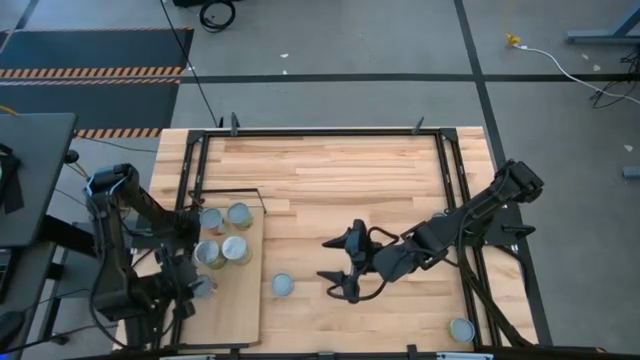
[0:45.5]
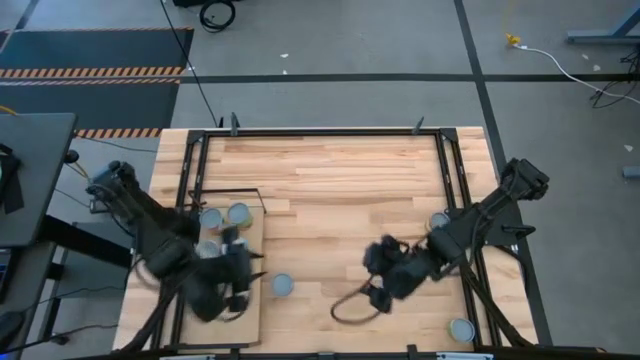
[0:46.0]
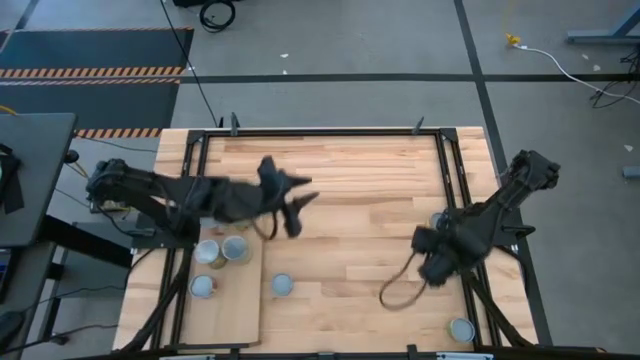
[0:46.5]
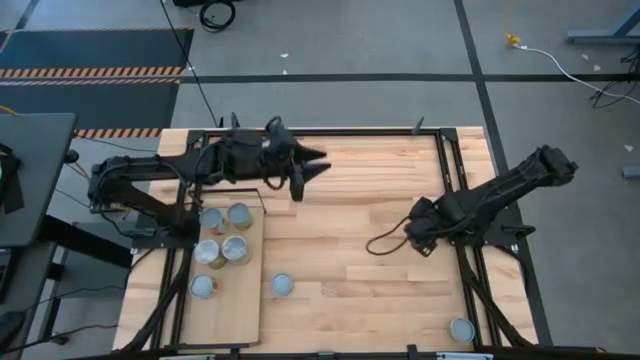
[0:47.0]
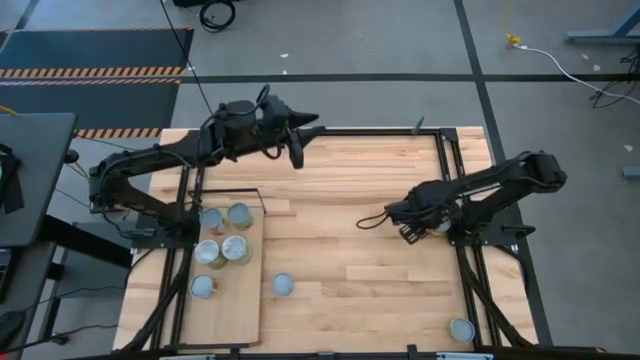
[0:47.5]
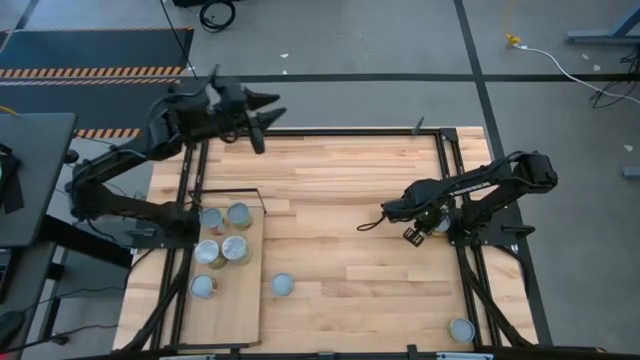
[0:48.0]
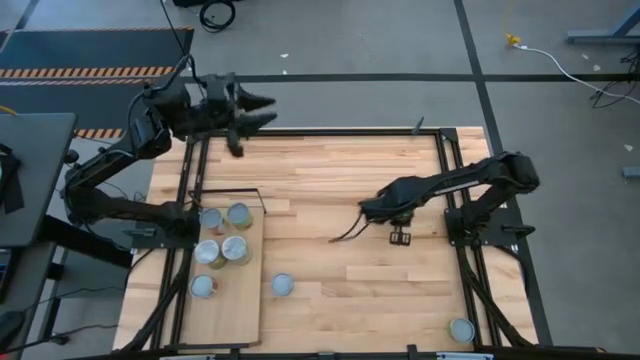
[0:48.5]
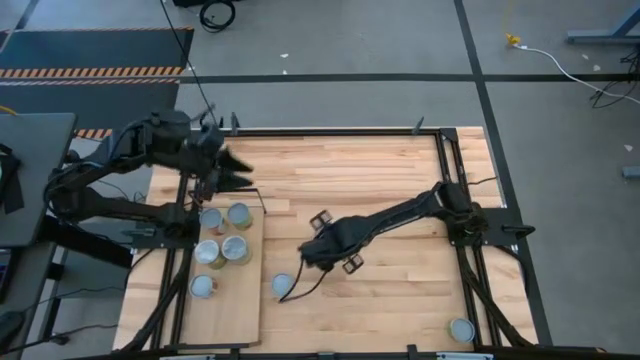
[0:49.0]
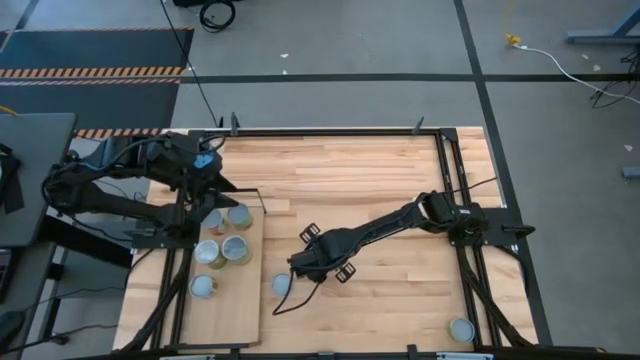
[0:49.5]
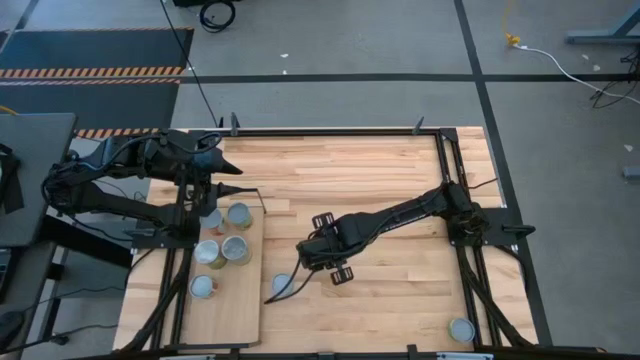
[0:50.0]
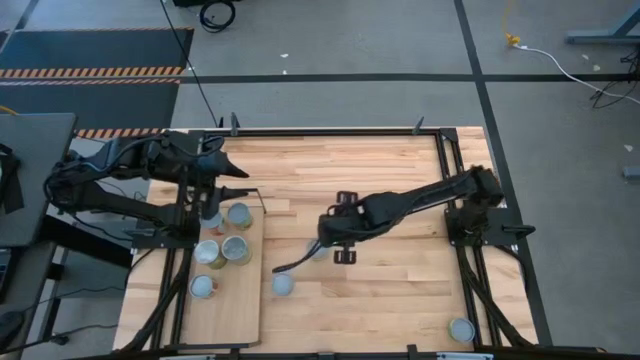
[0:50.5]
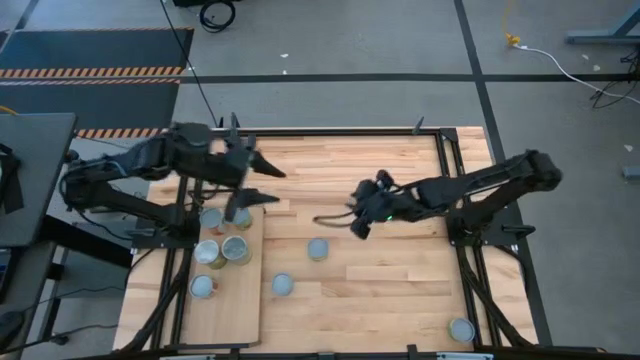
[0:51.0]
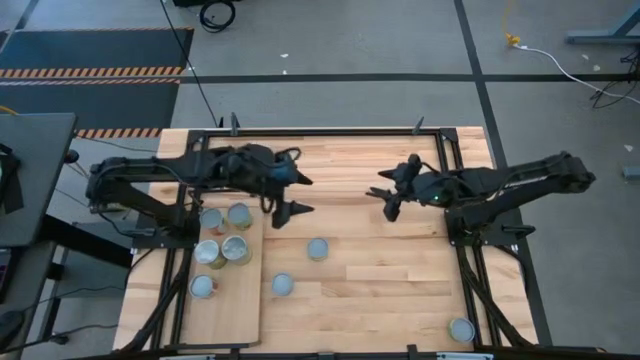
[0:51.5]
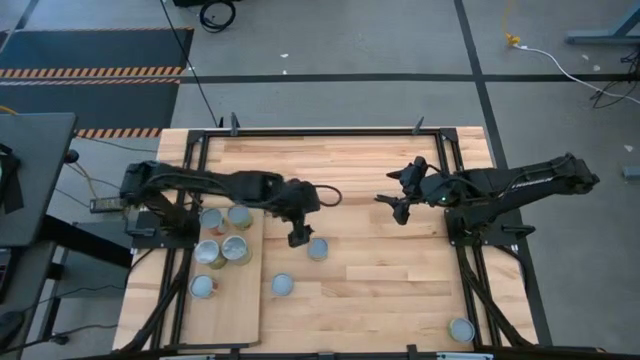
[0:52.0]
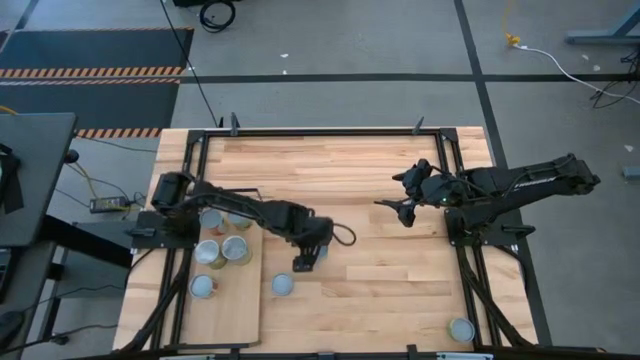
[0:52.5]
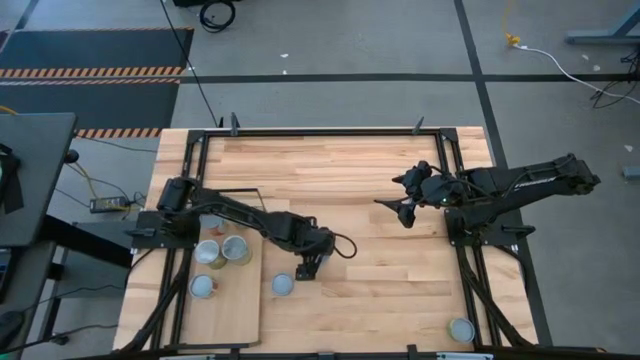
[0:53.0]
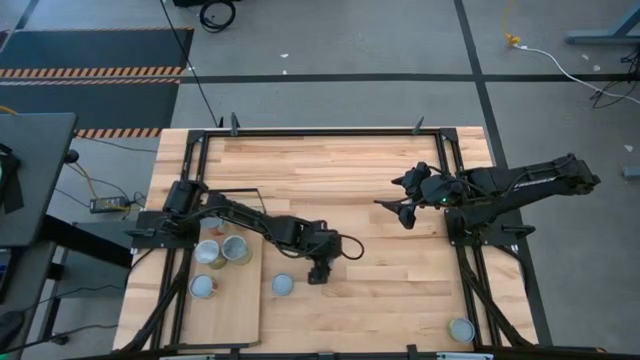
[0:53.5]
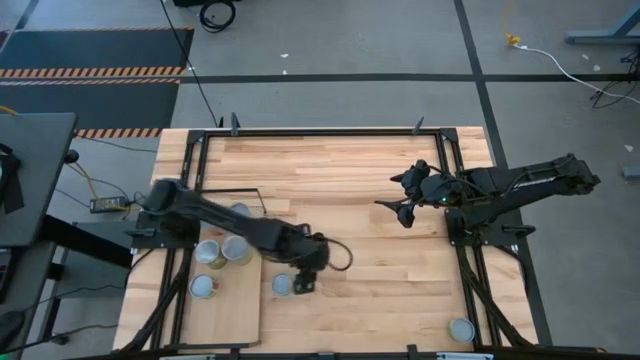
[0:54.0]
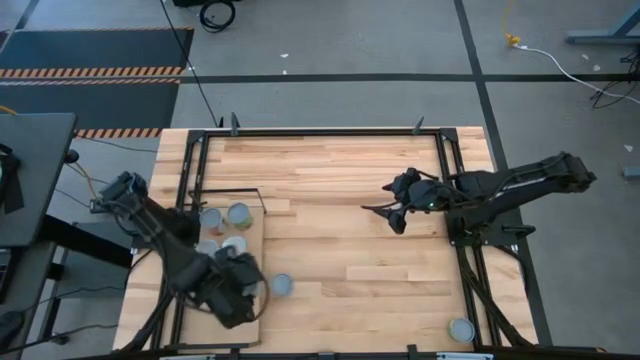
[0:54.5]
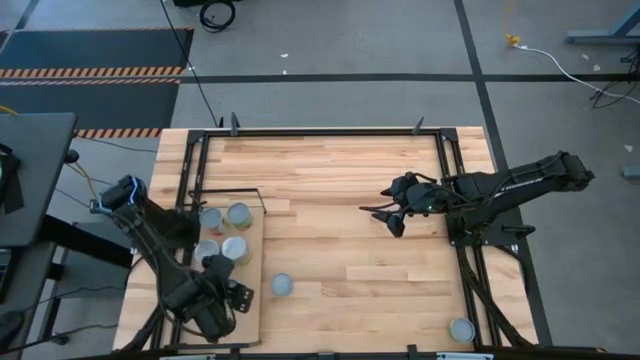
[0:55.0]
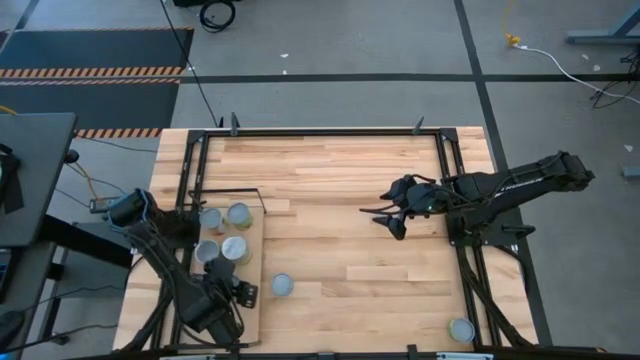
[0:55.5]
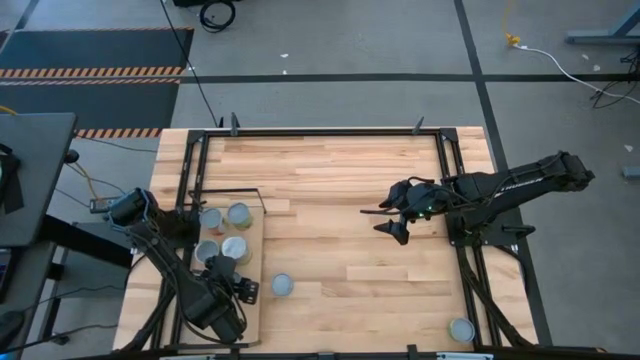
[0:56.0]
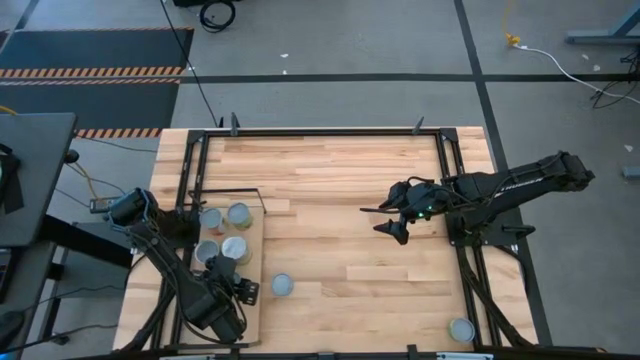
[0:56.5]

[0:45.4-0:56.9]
Task: Pick and place cans onto a shelf
Put the dark green can on the shelf

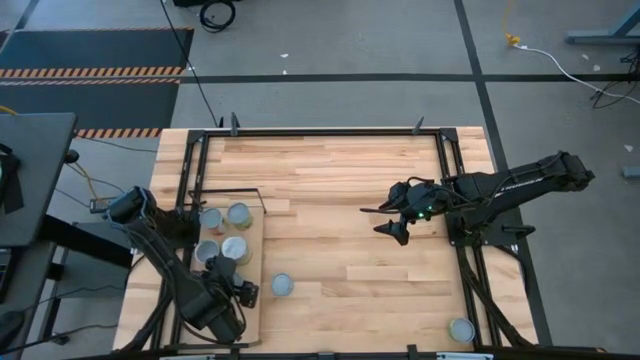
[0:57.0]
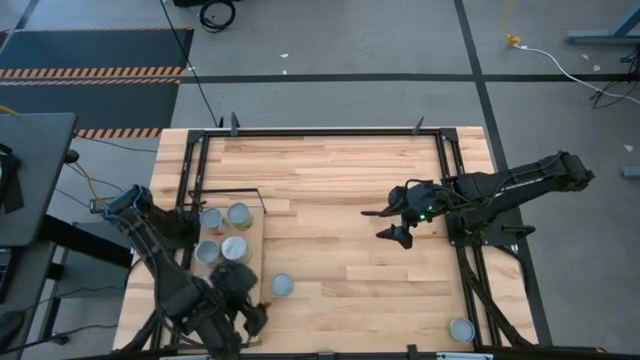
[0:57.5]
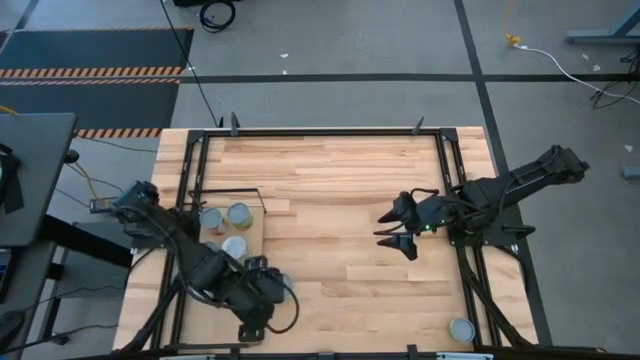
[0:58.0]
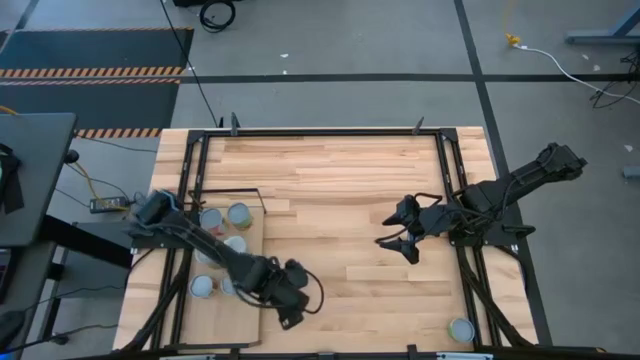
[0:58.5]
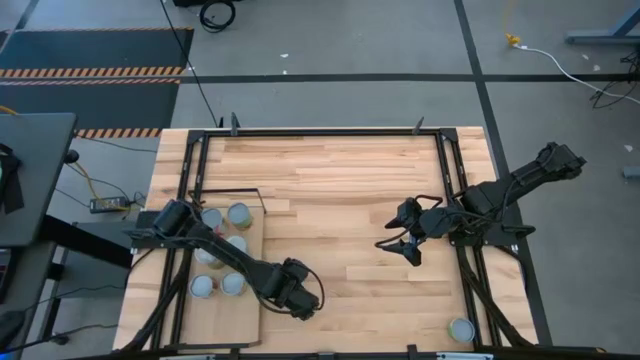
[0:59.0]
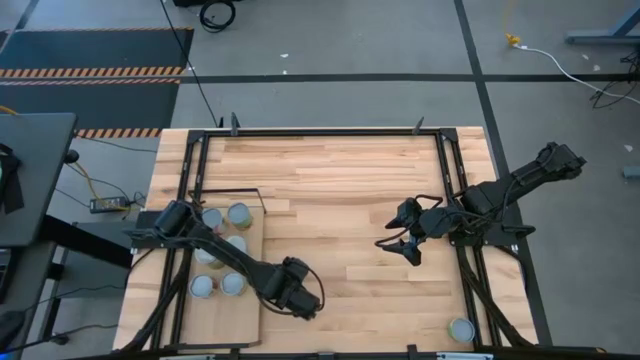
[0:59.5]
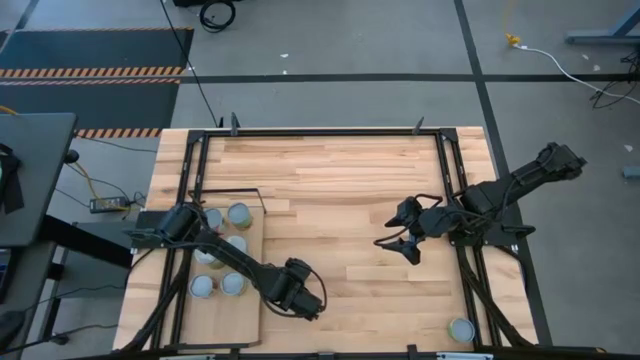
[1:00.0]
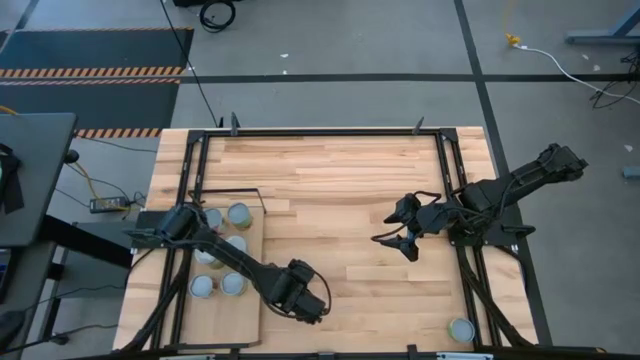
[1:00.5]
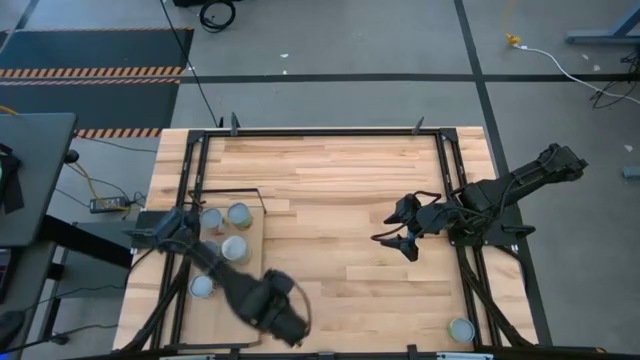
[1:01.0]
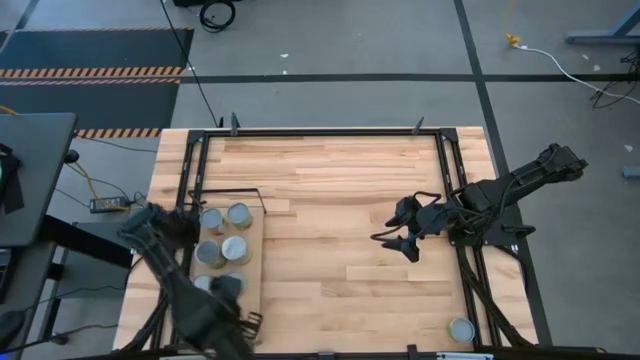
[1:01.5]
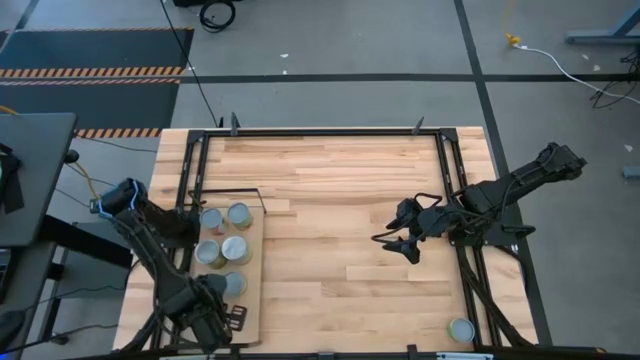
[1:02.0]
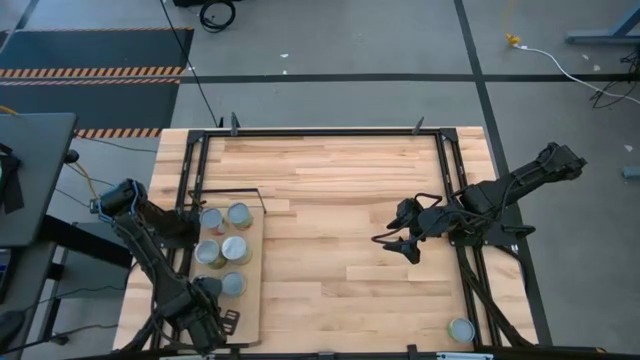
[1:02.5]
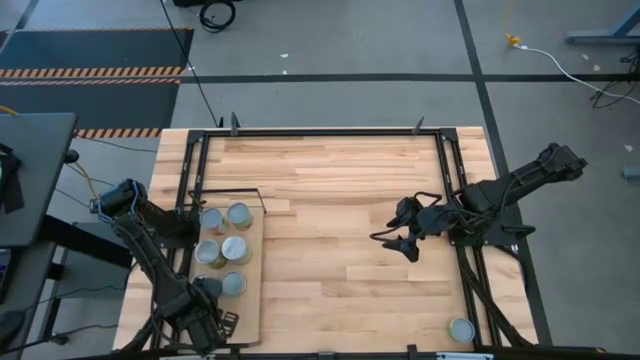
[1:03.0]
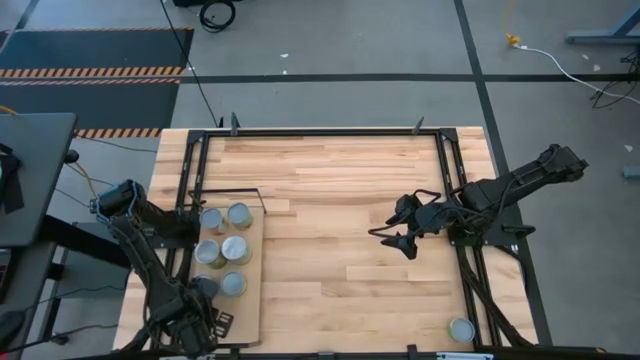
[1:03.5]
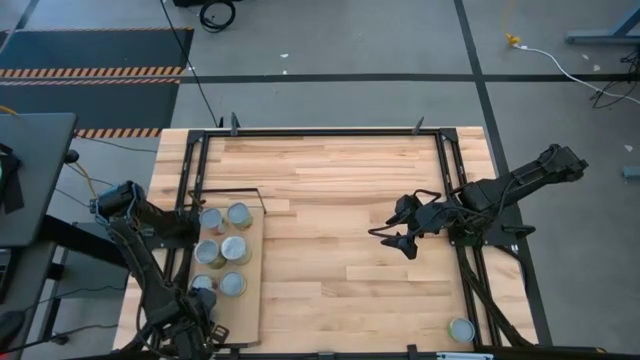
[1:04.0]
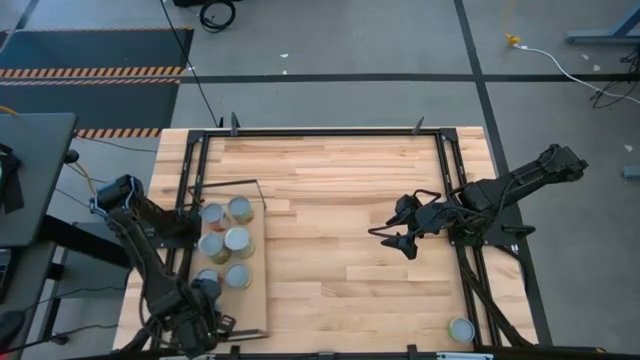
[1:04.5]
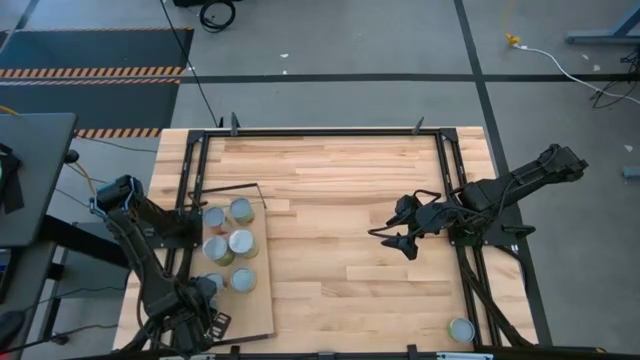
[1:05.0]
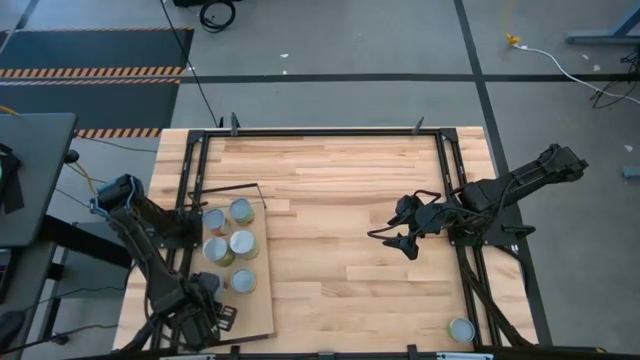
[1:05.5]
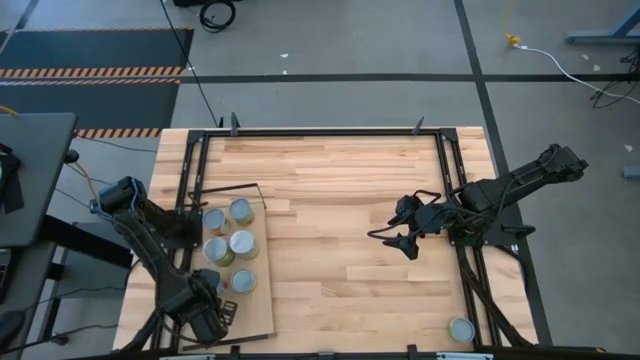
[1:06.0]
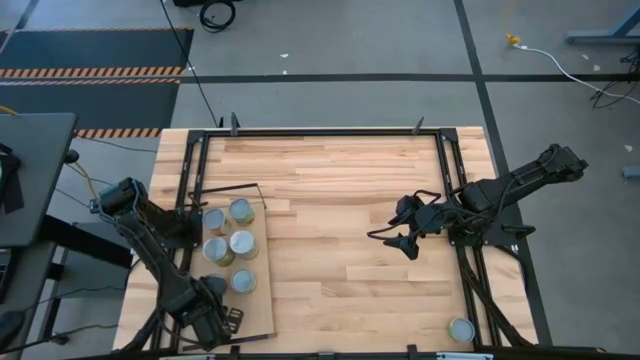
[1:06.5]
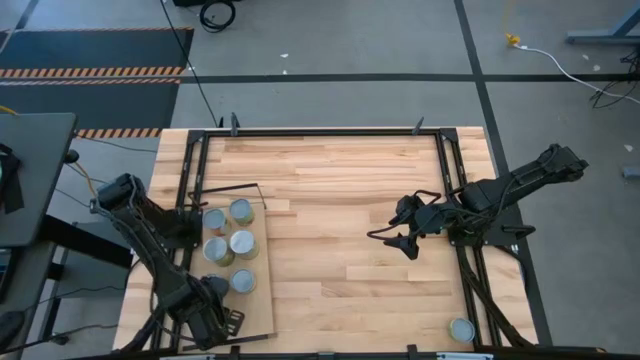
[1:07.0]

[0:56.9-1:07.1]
Put the blue can on the shelf

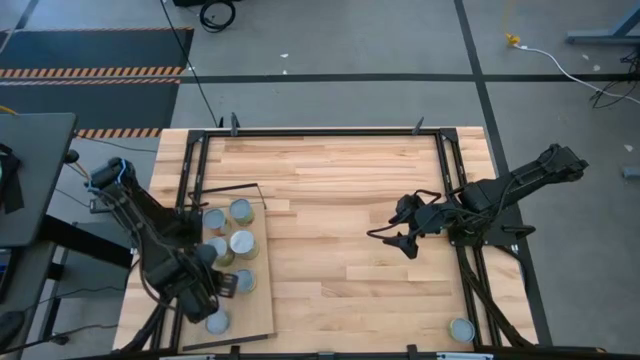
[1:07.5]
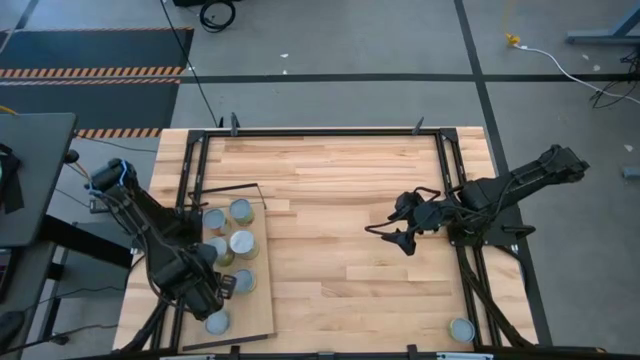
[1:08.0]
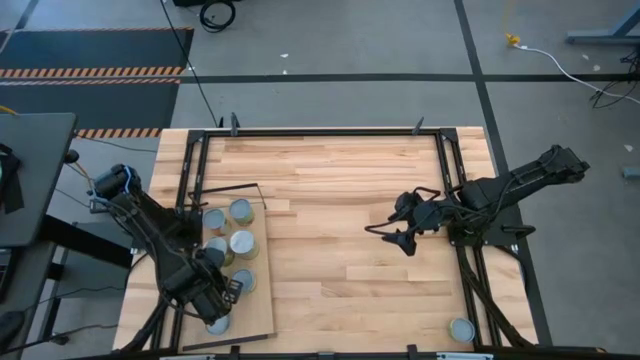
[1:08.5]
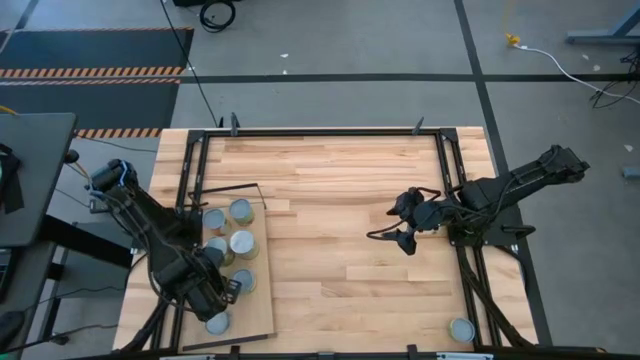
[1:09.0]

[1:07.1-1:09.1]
Adjust the white can on the shelf
